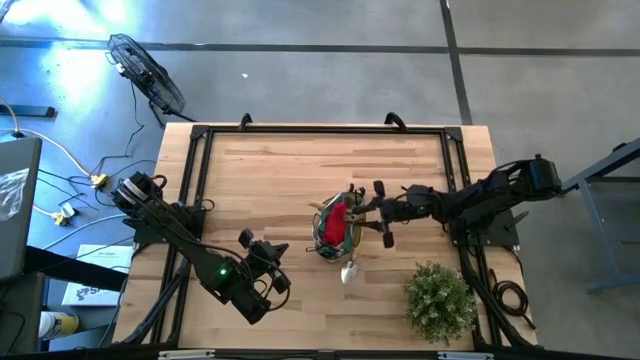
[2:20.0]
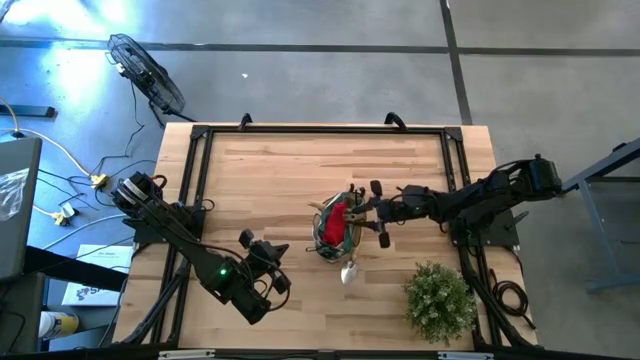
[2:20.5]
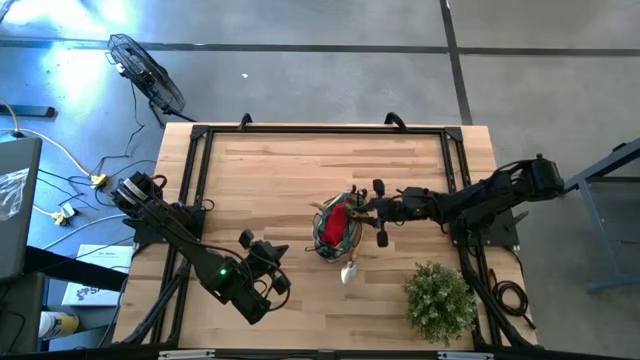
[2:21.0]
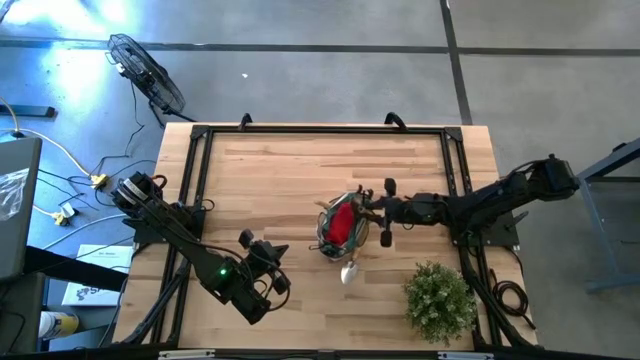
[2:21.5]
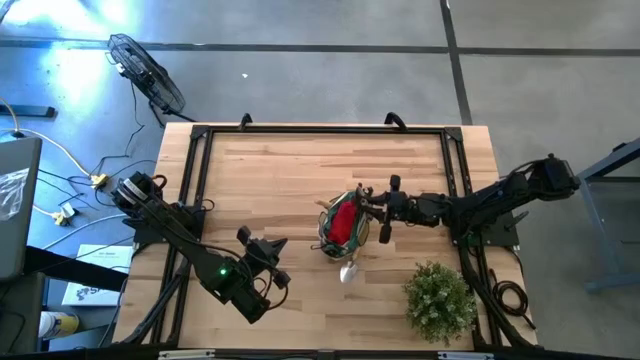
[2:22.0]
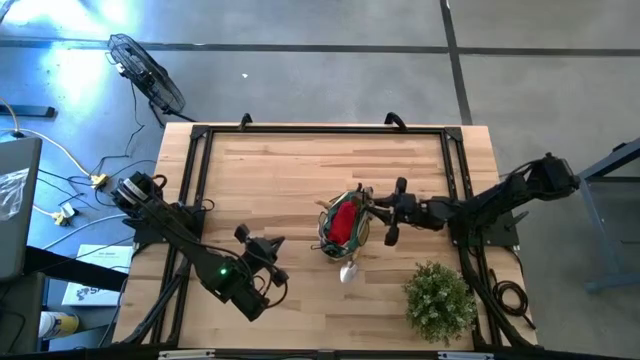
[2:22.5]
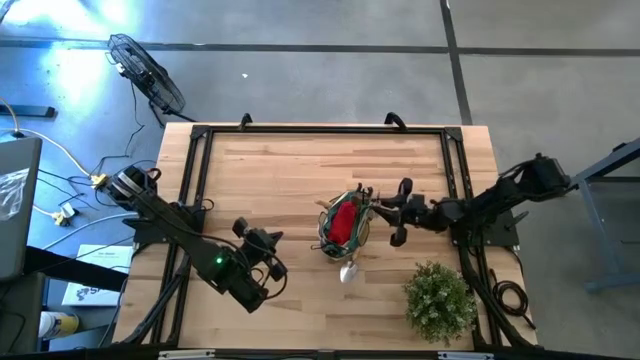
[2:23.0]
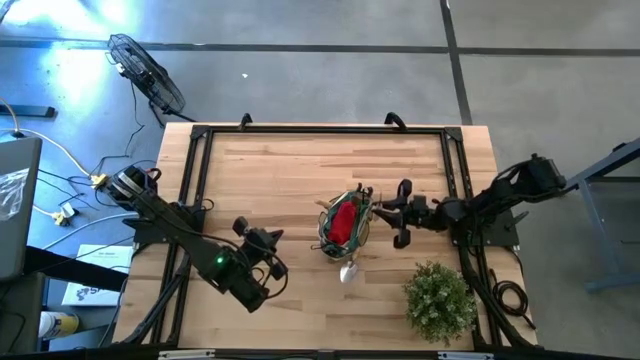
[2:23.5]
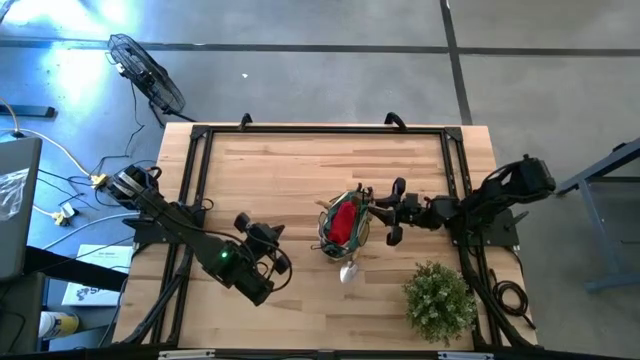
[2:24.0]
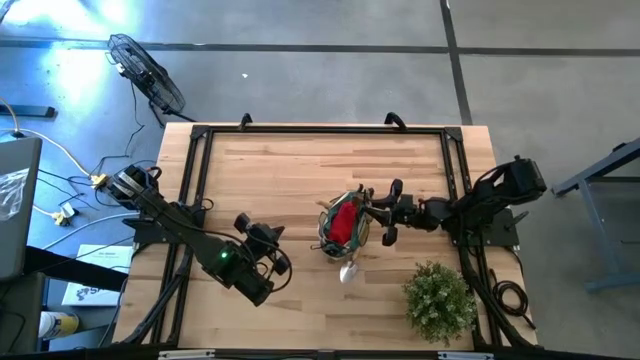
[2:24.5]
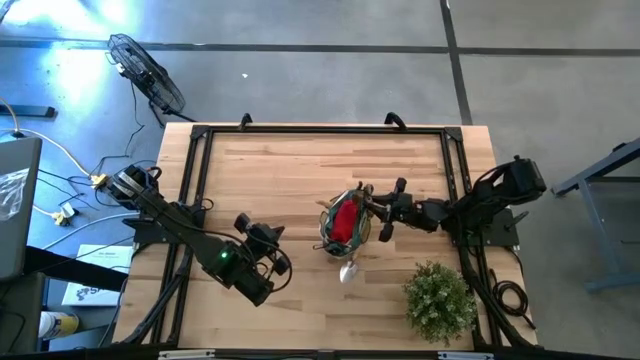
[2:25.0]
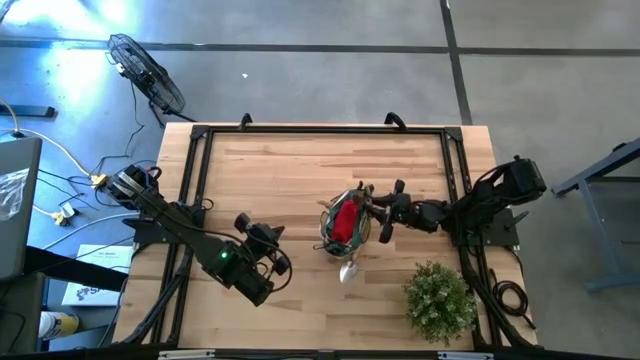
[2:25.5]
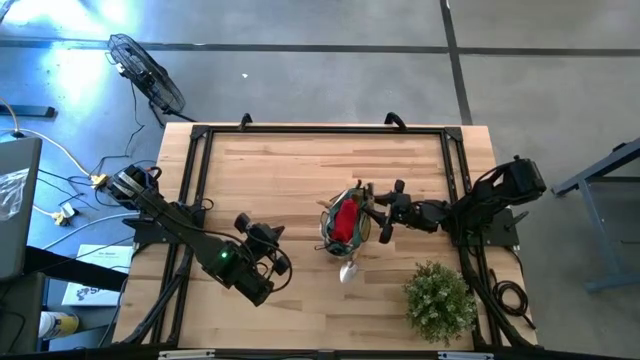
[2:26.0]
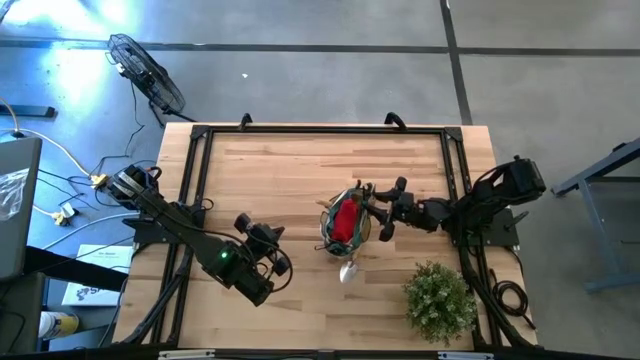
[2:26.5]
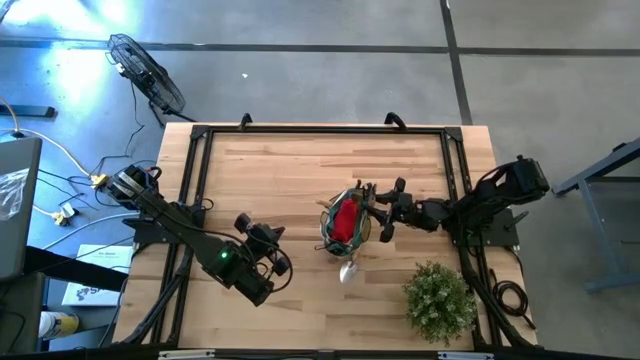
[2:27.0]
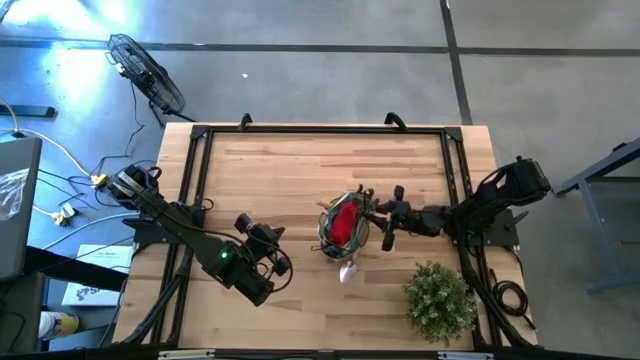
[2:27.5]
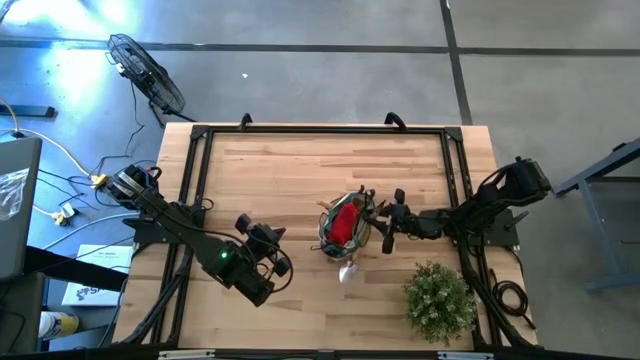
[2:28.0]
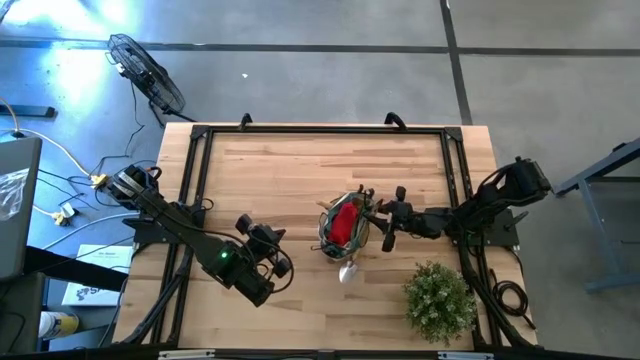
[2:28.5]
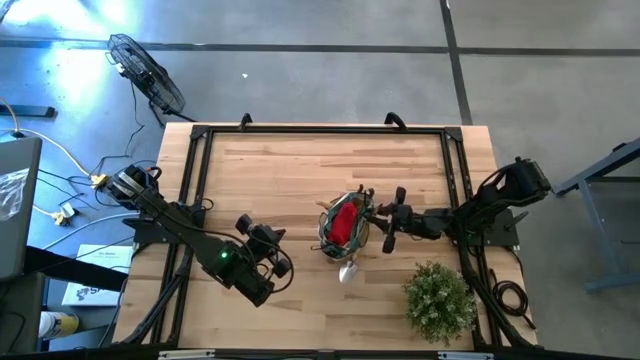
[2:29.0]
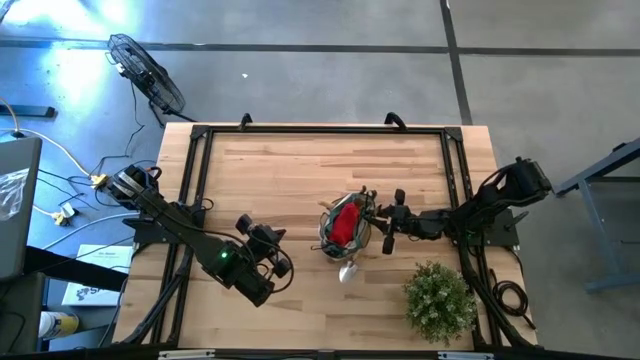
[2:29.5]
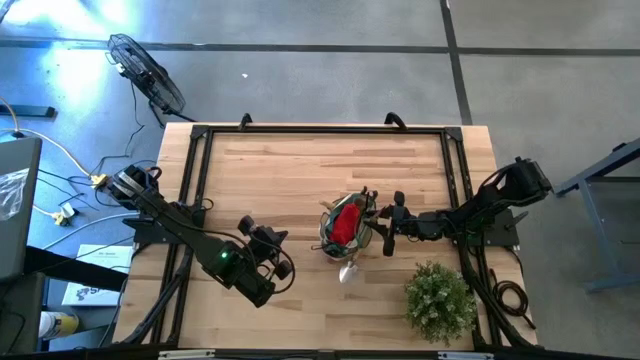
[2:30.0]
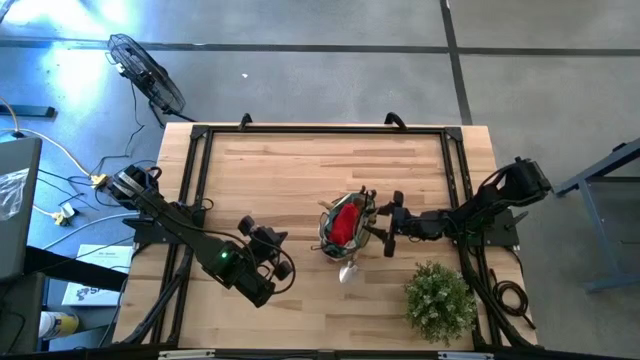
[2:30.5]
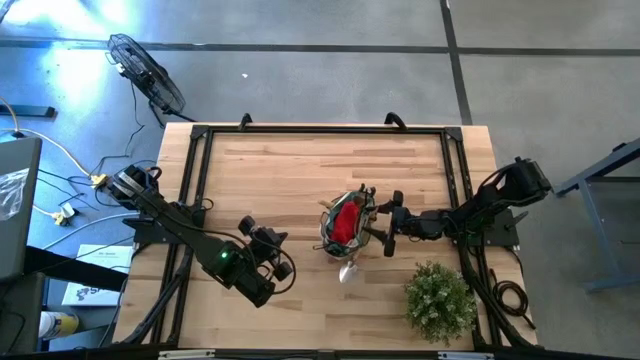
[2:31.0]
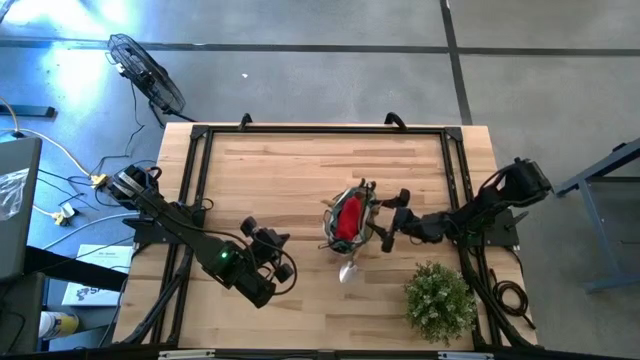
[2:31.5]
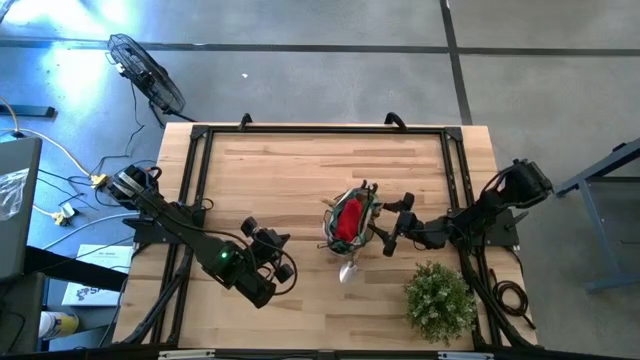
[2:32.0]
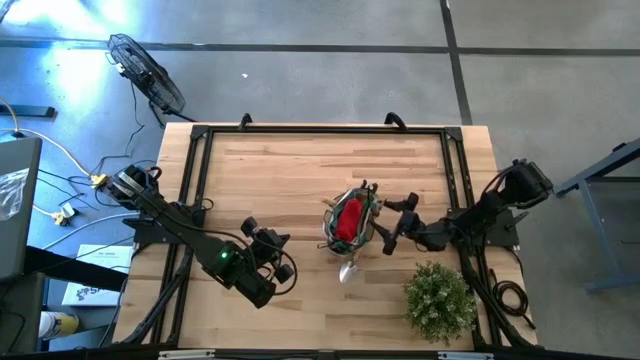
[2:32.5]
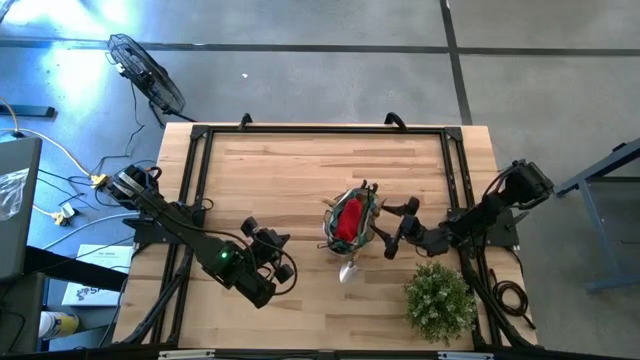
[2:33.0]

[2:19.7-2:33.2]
Task: Pick & Place Garden tools in Gardening bag
Put the right brown trowel into the green gardening bag

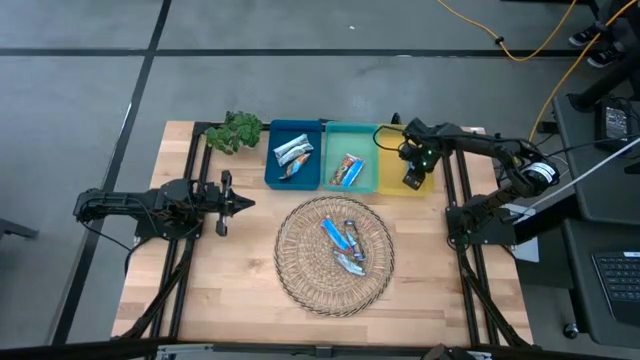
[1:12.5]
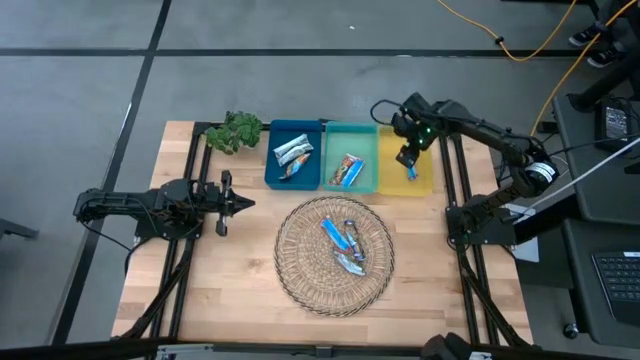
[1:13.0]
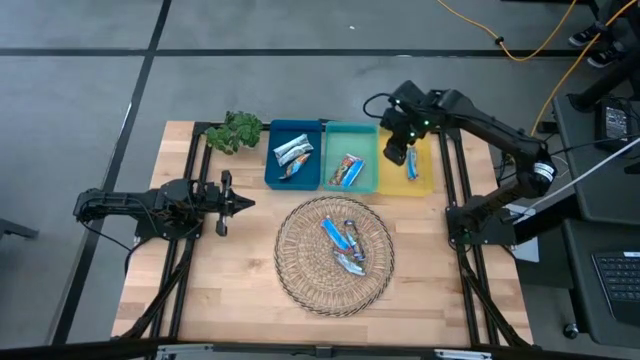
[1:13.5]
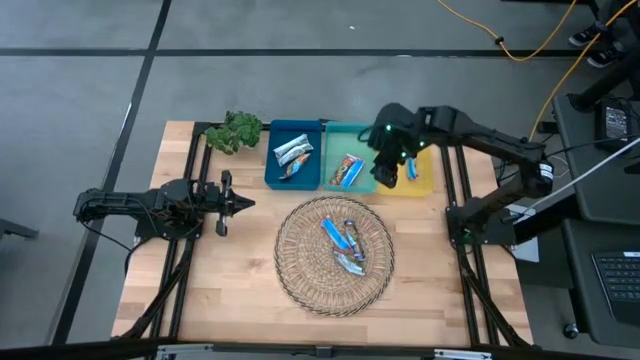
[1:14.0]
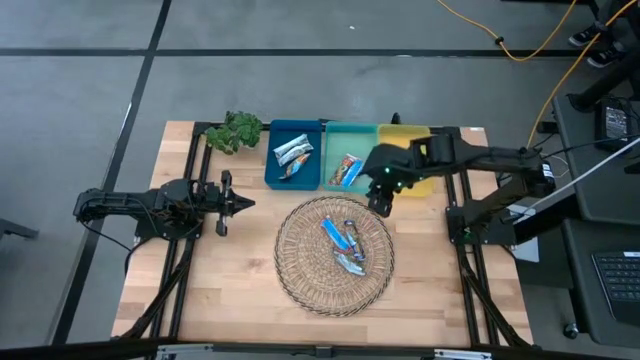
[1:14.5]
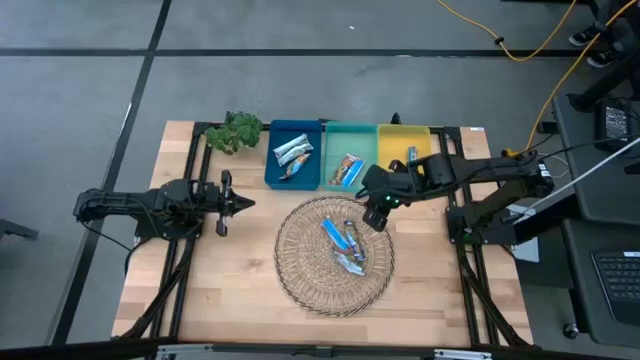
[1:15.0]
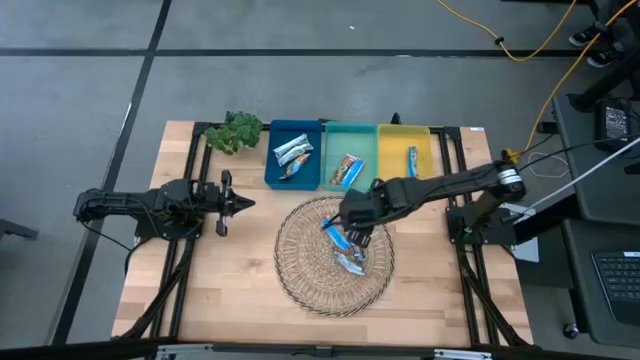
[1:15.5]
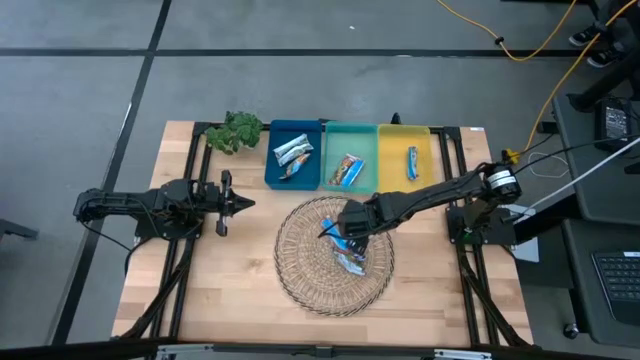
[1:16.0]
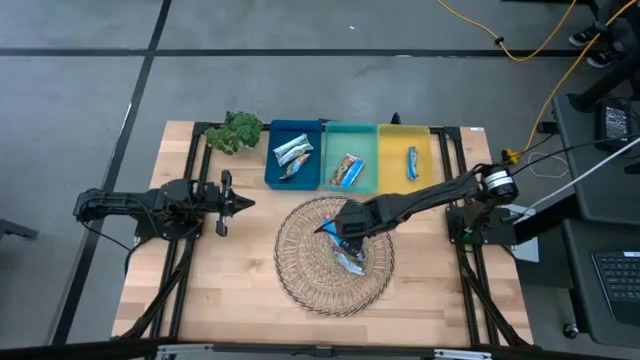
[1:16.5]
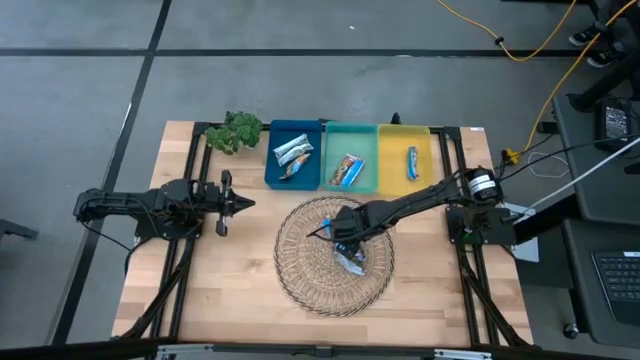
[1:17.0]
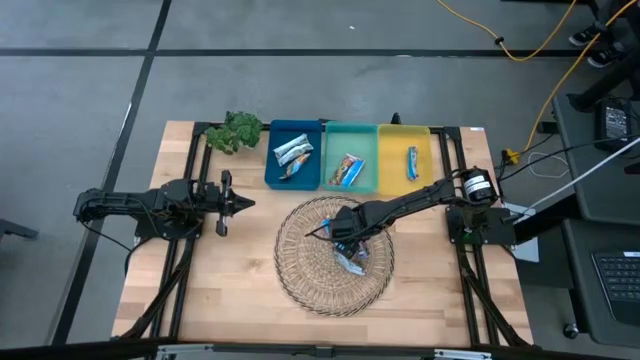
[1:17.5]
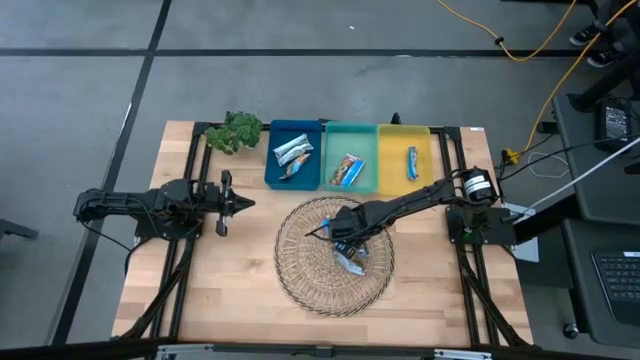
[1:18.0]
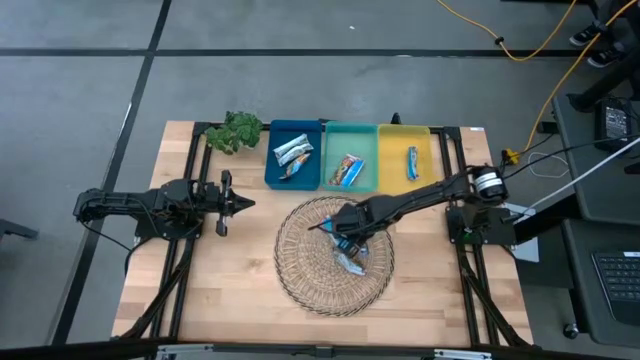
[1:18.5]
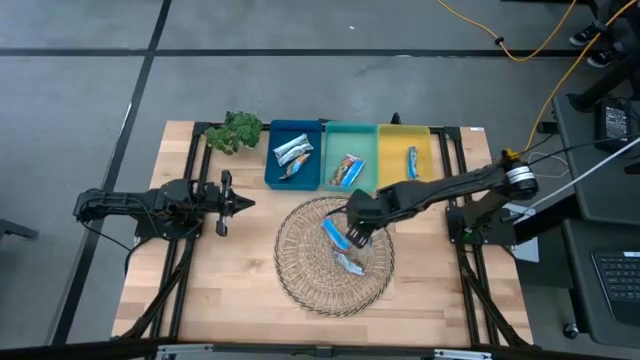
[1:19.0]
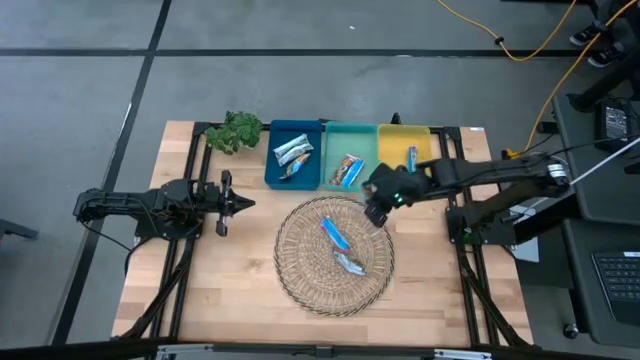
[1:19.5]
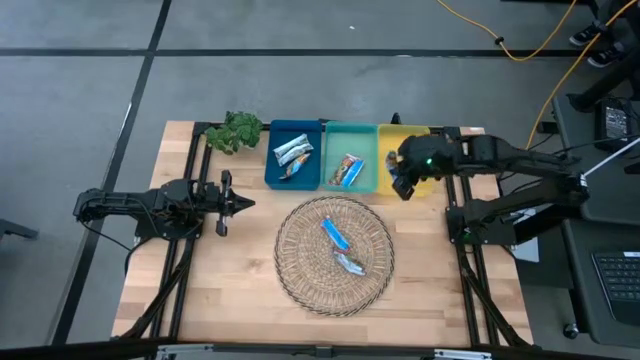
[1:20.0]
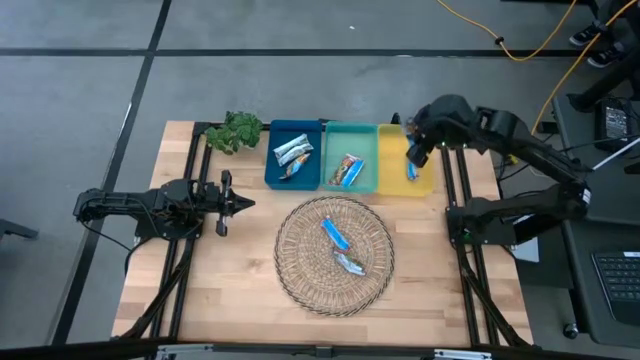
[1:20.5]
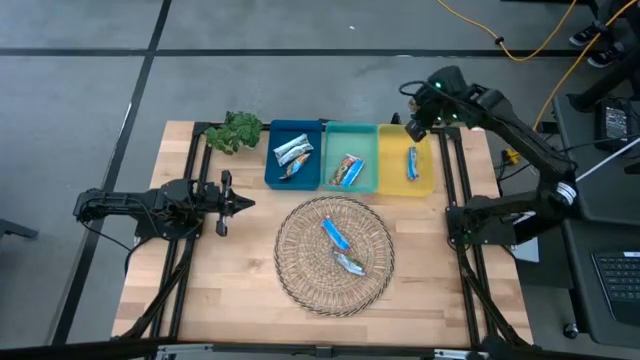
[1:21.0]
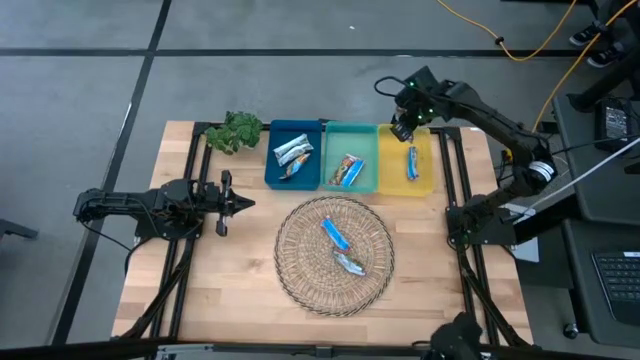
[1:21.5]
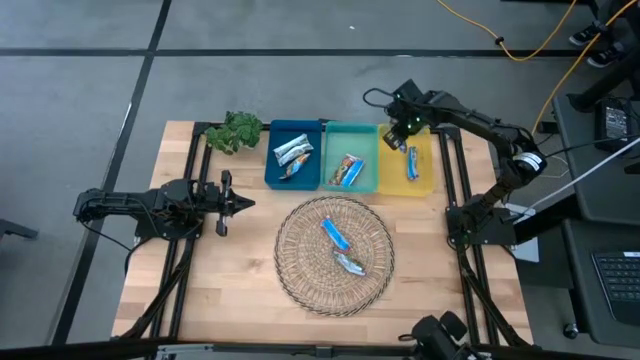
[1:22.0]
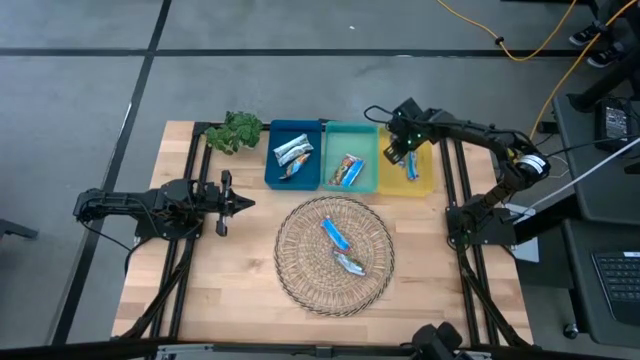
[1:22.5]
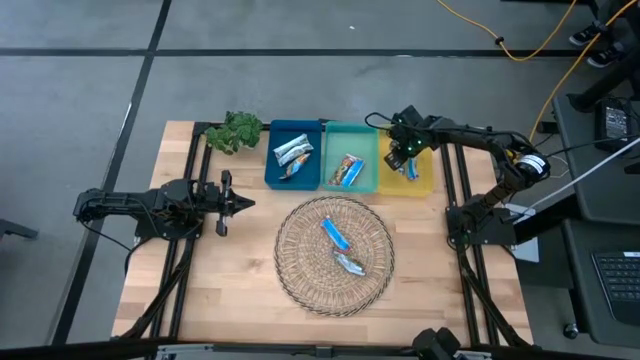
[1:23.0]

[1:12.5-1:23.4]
Task: Pick and place Granola Bars by type
Put the blue granola bar into the yellow bin
